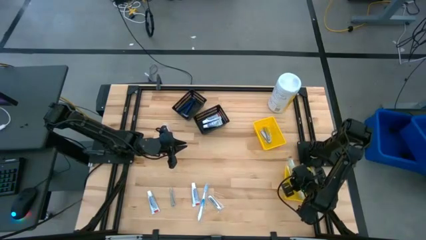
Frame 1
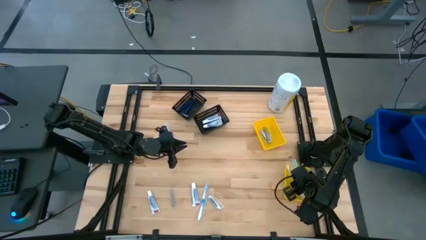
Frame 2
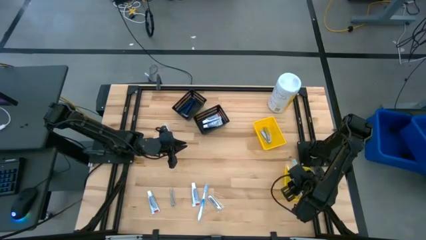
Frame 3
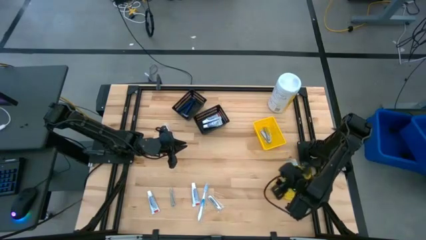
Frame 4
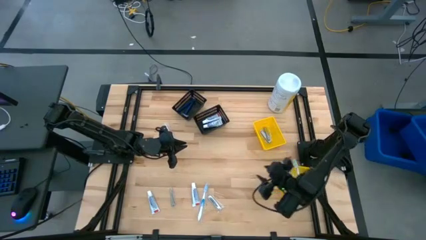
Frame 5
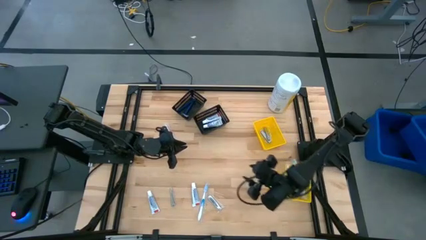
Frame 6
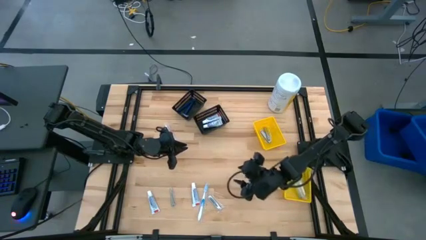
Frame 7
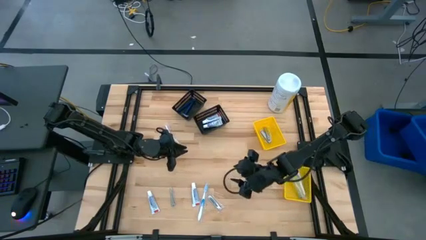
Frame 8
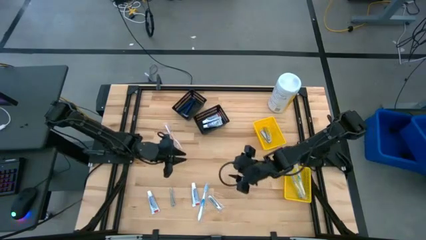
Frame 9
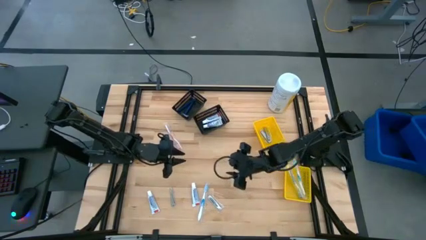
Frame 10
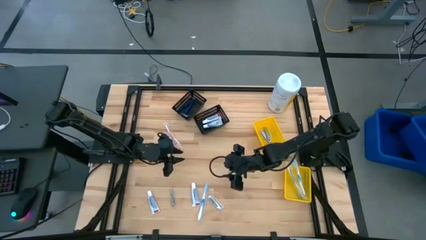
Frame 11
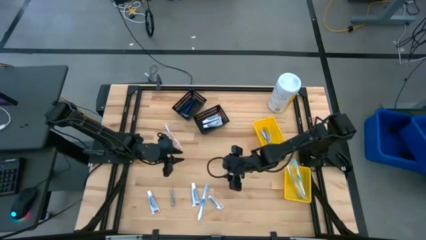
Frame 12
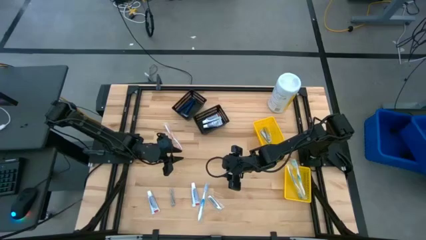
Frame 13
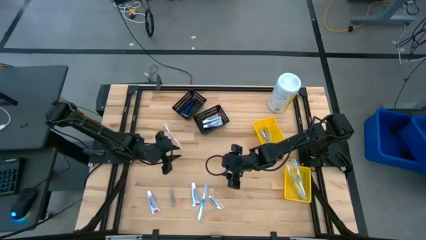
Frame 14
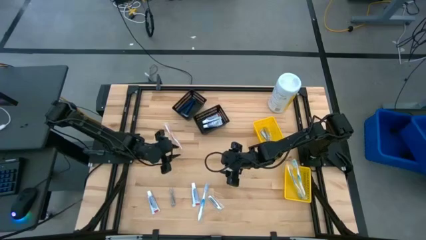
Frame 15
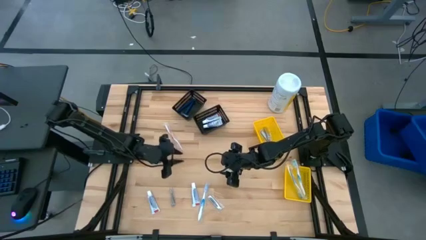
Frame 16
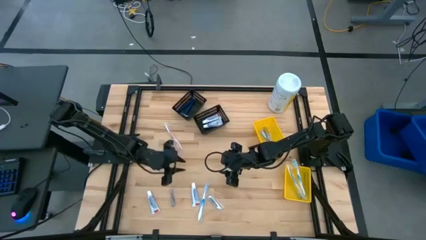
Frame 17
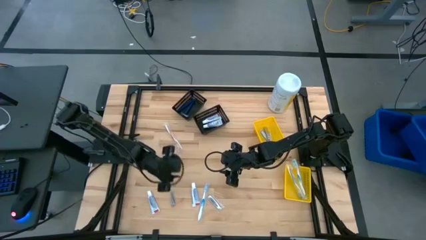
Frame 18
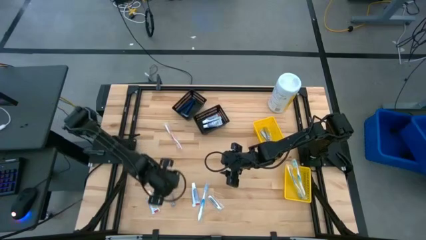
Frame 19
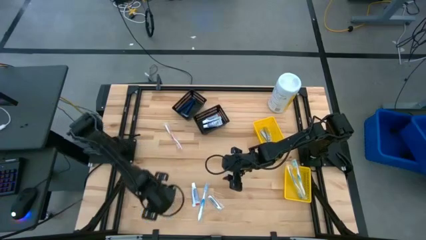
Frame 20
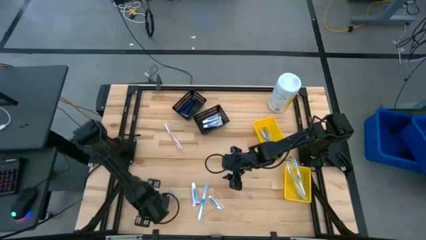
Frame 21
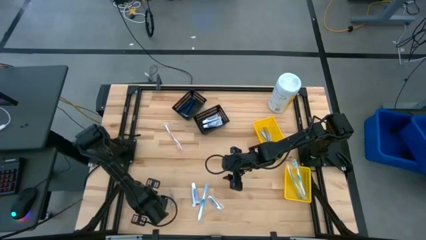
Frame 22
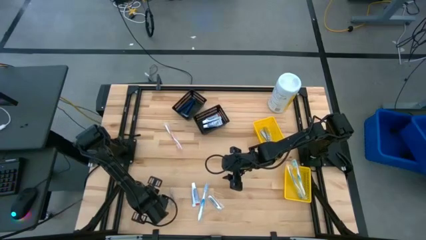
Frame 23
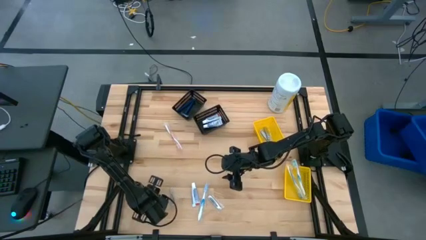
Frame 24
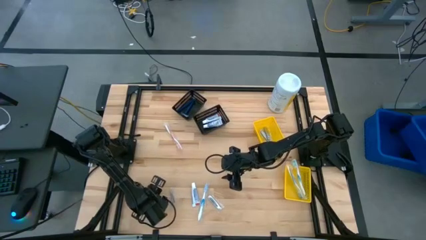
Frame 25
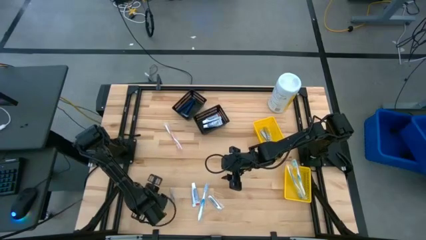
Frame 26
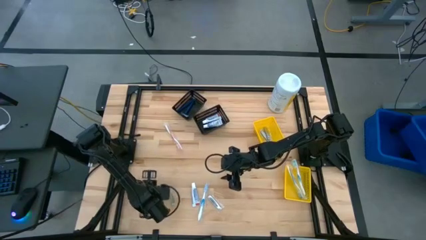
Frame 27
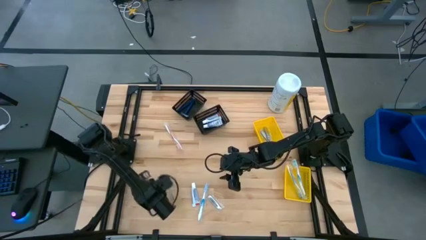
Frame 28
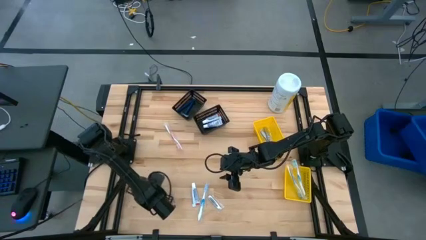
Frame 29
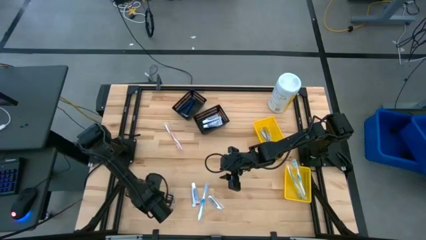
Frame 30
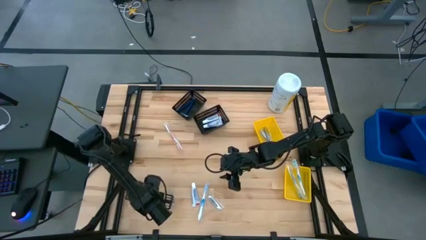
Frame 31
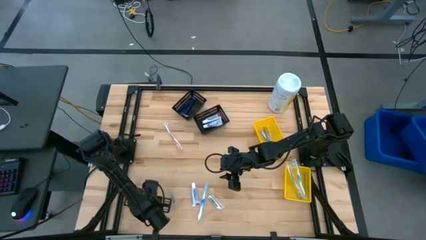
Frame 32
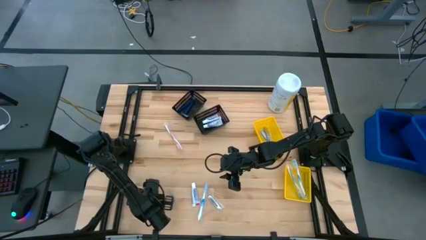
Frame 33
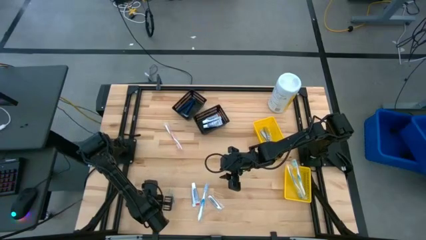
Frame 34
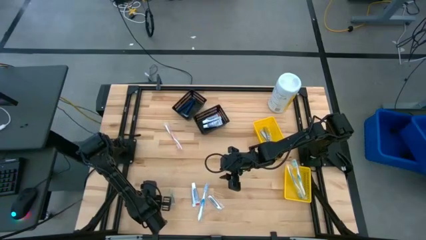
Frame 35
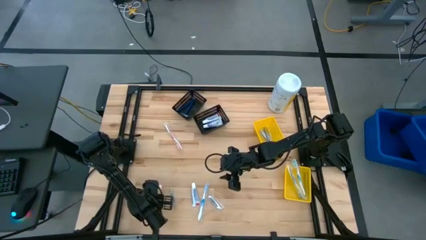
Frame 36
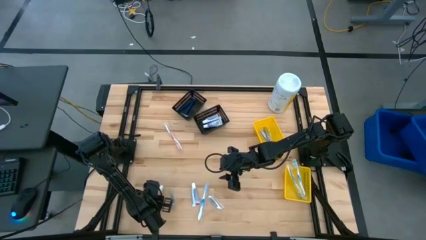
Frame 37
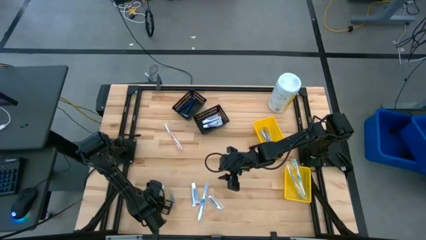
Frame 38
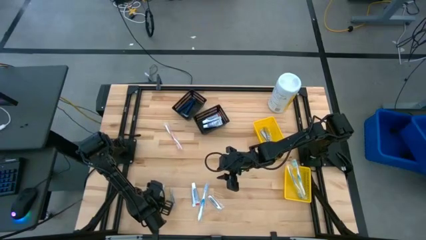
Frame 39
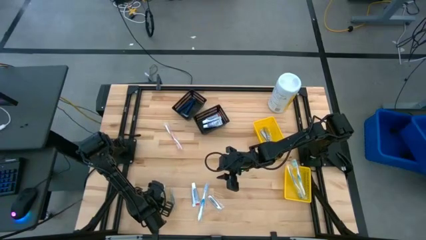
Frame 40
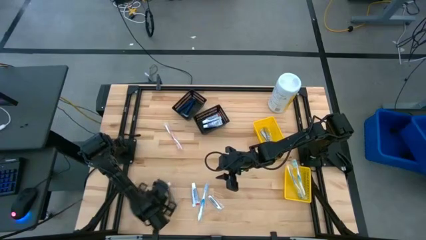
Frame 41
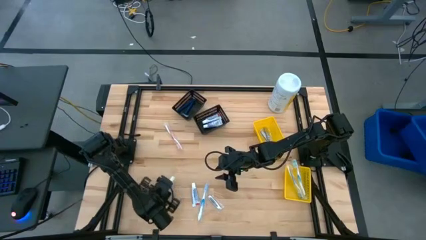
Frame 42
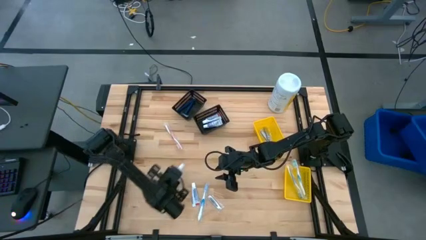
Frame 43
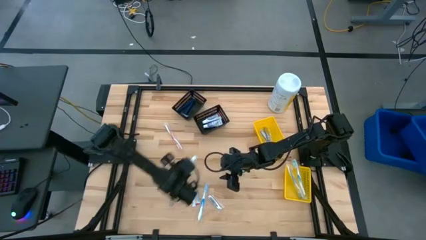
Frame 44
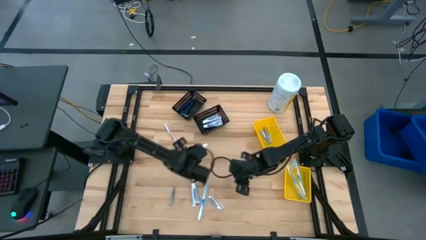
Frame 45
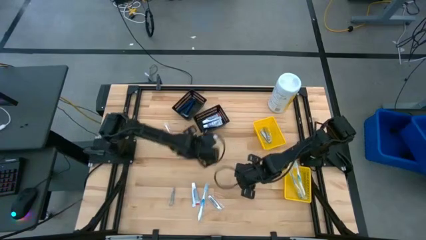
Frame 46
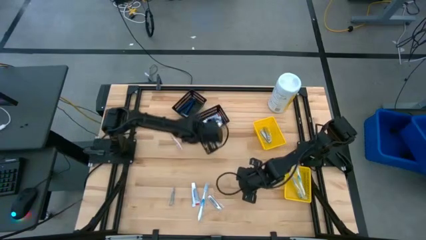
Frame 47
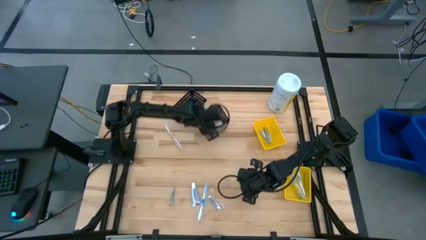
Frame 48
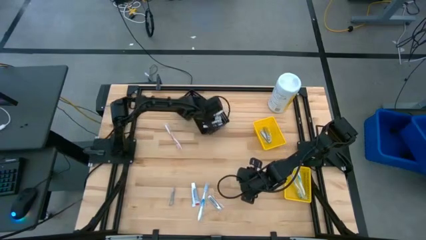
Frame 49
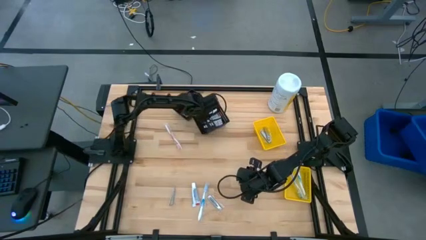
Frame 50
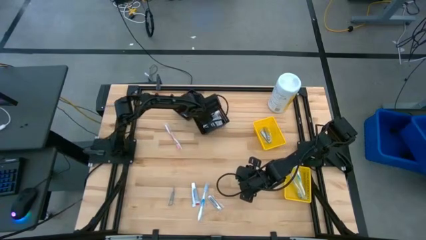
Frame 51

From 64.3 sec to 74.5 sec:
Task: Pick & Place Travel size toiletries
Put the toothpaste into the bottom black bin

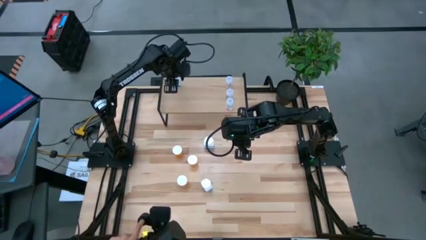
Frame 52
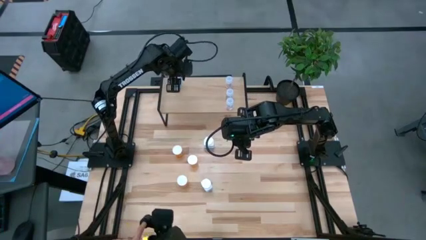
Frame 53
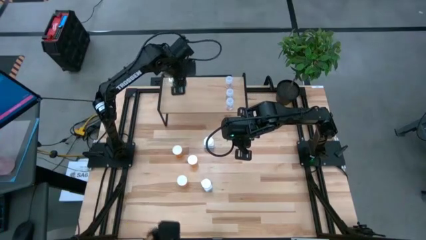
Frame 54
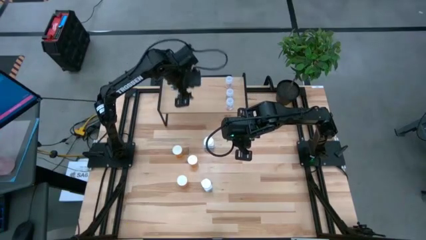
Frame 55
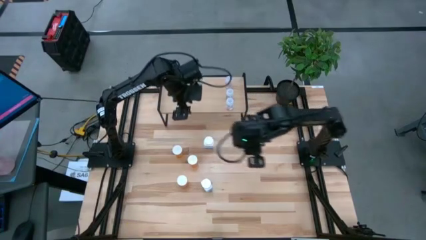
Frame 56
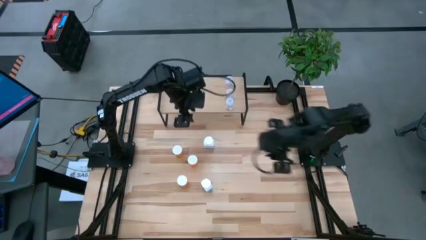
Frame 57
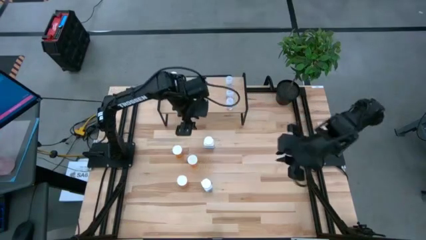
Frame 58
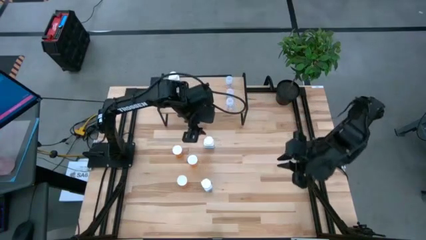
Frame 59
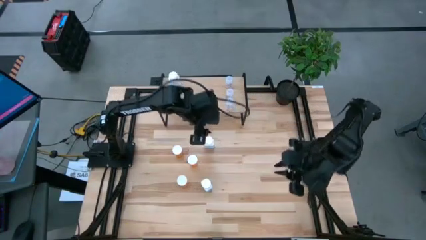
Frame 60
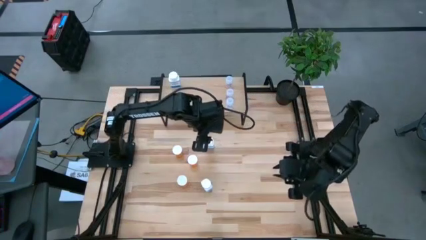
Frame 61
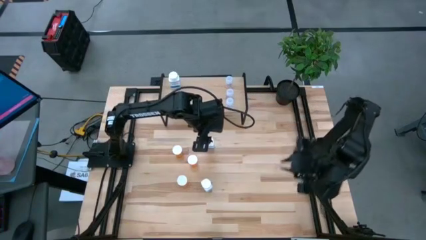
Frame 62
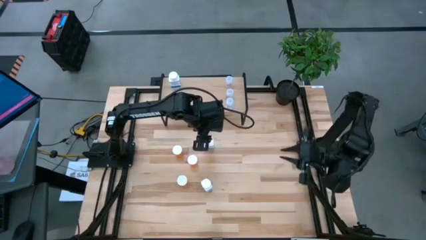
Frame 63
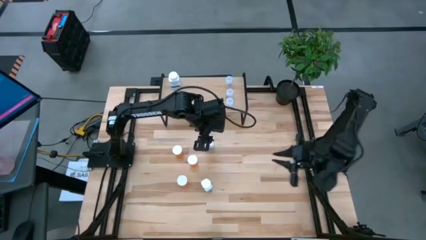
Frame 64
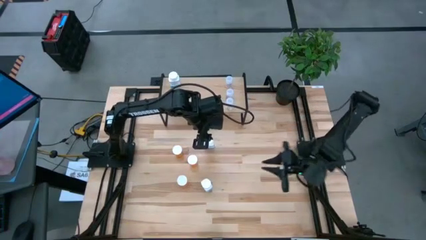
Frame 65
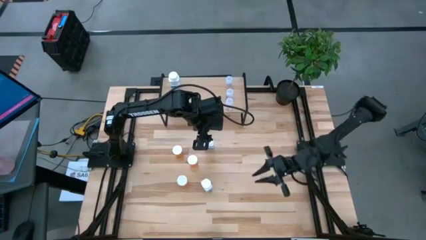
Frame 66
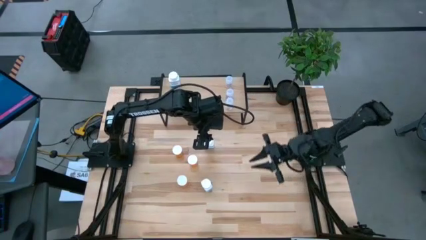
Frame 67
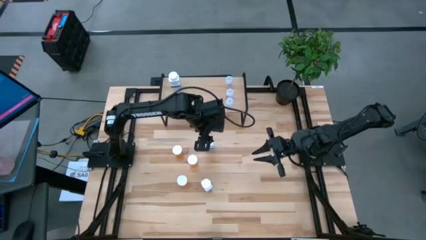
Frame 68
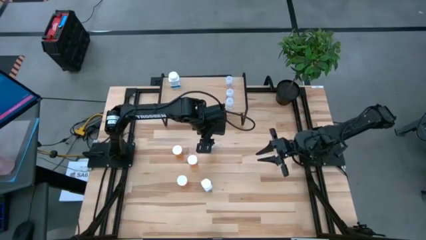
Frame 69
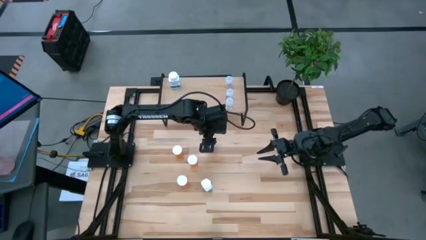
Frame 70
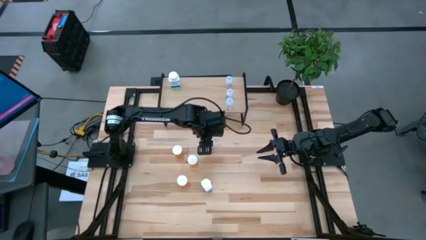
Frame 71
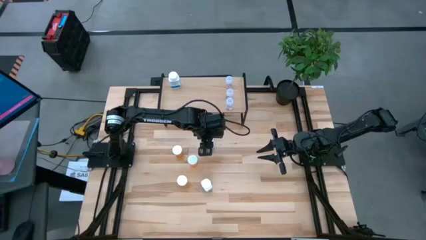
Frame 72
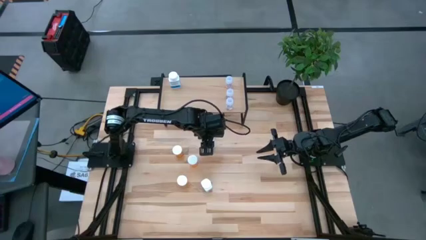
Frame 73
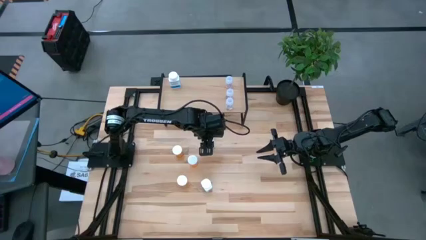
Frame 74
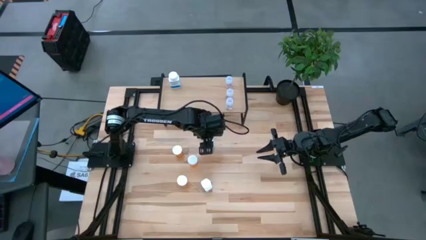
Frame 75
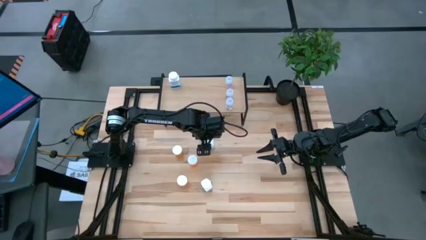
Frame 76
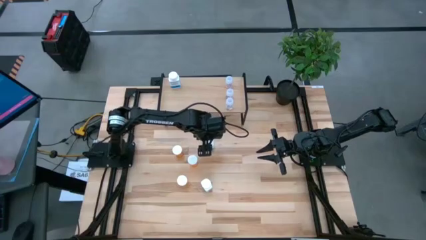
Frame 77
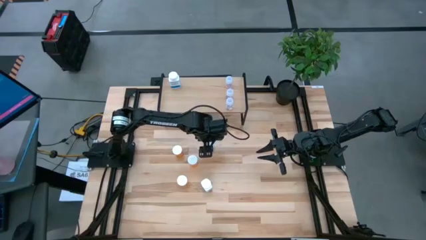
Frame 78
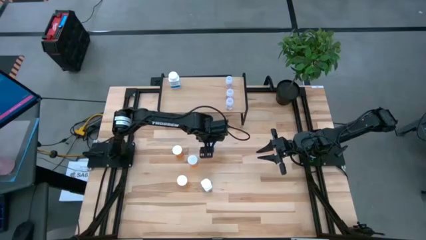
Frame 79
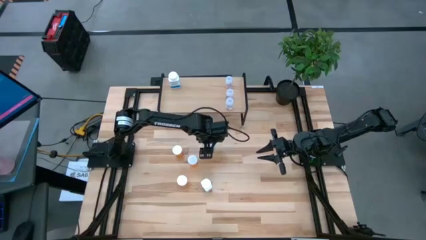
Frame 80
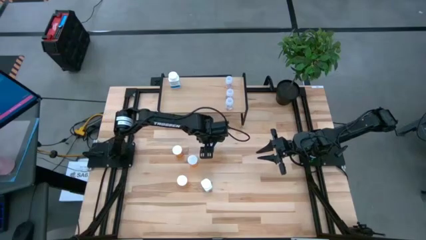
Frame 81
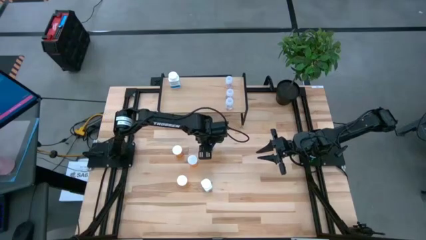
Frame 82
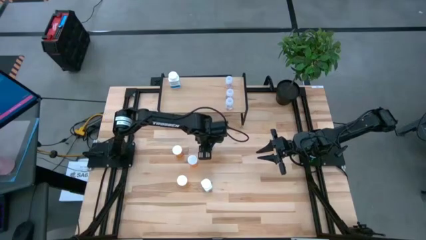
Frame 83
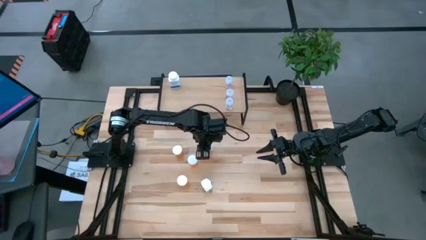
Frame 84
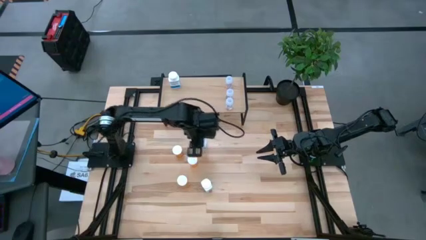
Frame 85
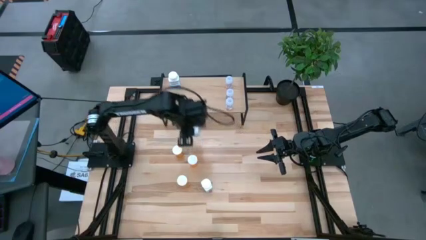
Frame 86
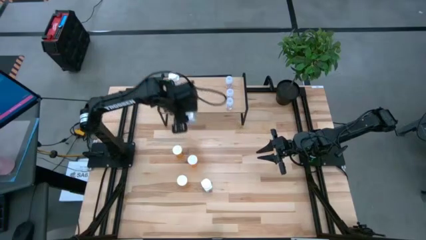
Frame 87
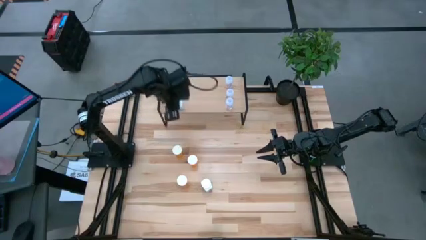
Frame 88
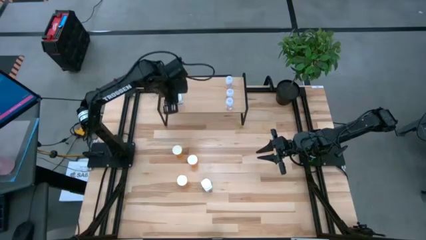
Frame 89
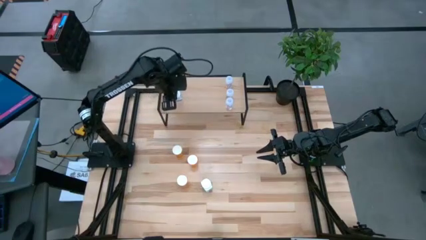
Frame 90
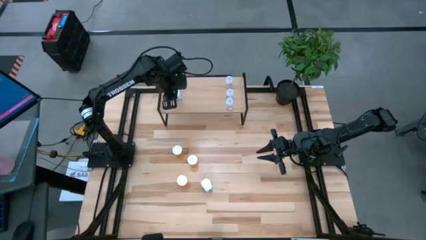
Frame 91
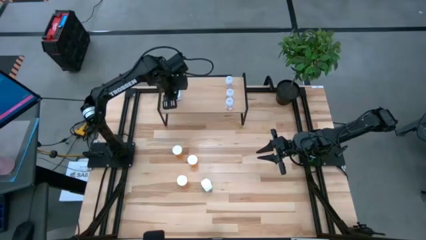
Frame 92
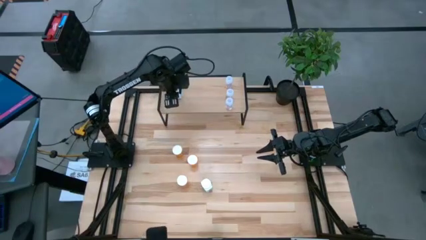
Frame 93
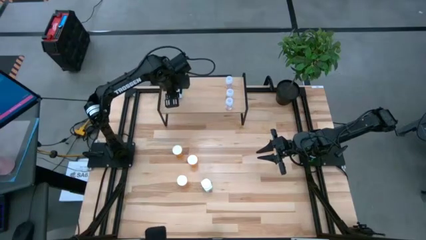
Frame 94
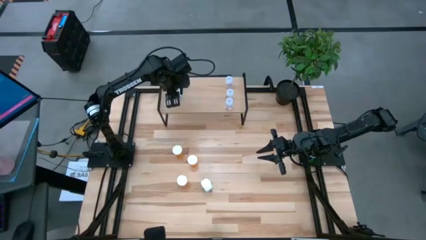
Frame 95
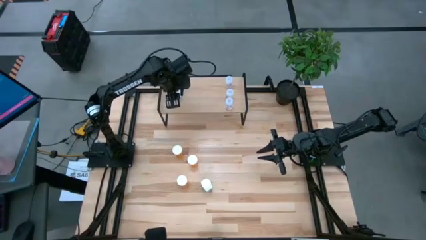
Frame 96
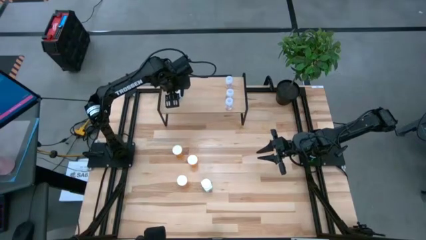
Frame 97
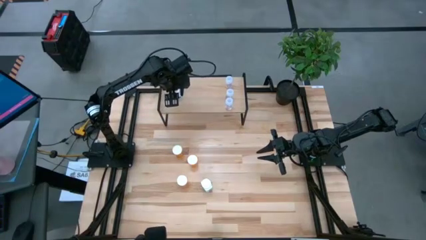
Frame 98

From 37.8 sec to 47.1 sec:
Task: Pick and place medicine bottles onto shelf by color
Put the top white pill bottle on the shelf aligned with the other white pill bottle
